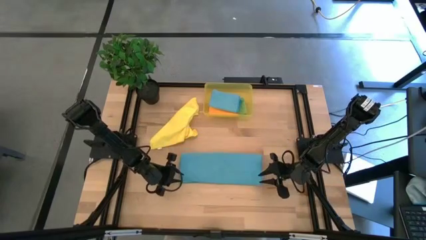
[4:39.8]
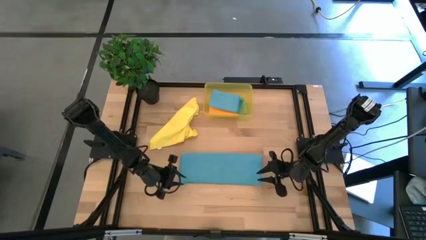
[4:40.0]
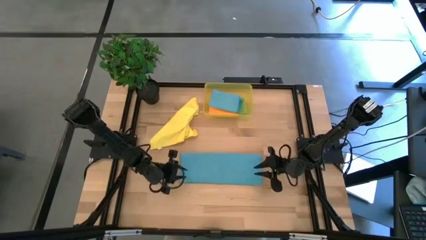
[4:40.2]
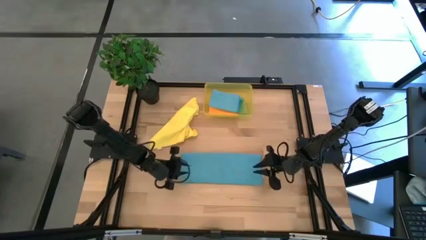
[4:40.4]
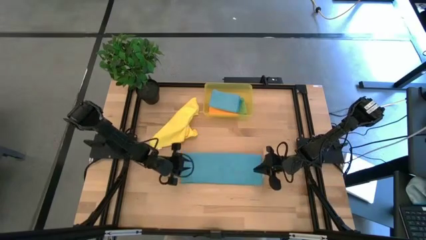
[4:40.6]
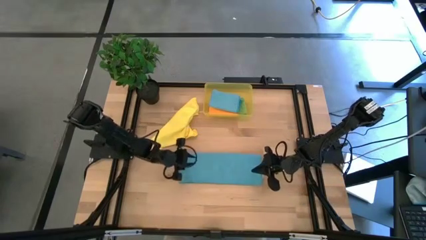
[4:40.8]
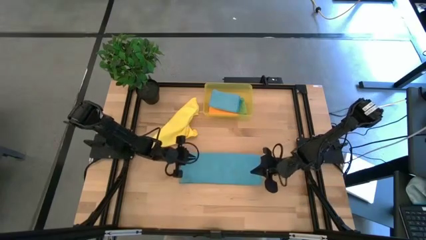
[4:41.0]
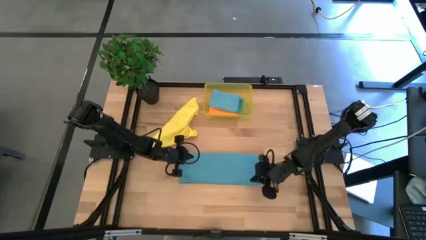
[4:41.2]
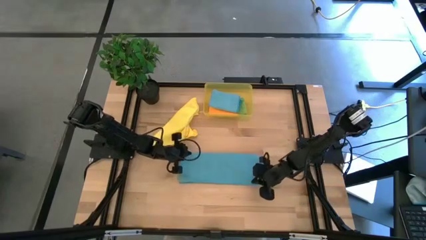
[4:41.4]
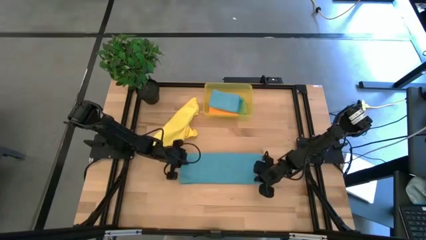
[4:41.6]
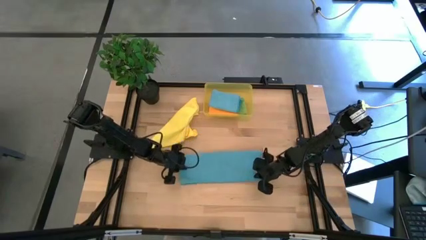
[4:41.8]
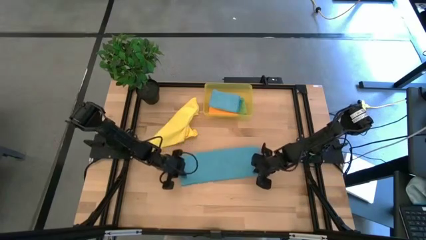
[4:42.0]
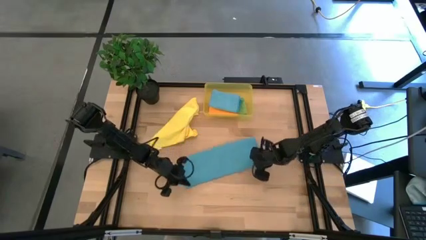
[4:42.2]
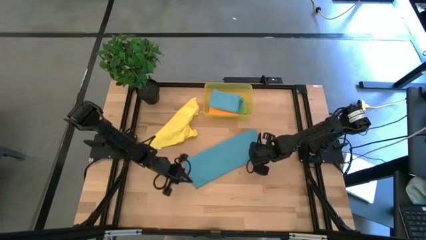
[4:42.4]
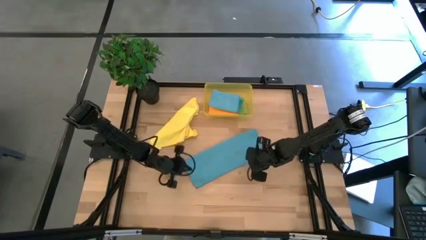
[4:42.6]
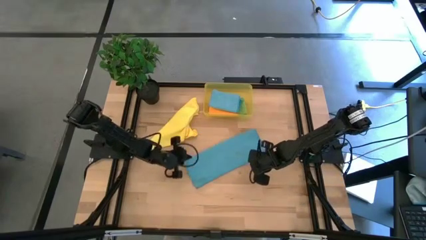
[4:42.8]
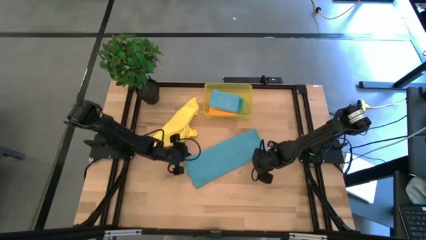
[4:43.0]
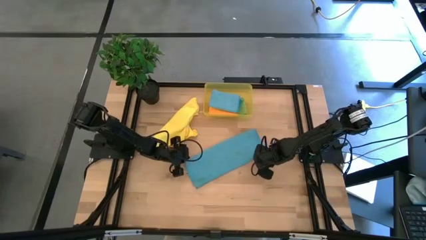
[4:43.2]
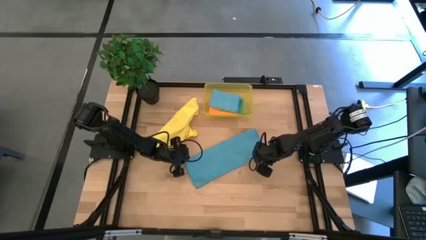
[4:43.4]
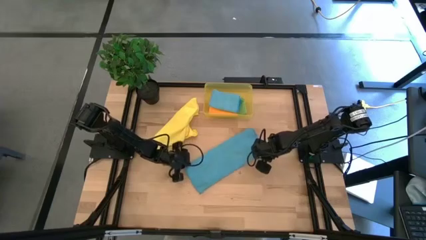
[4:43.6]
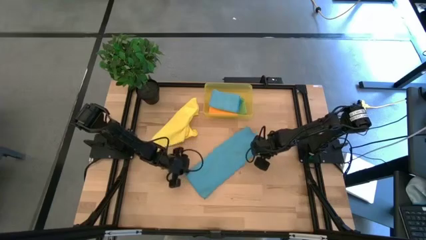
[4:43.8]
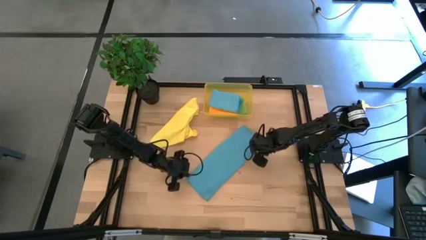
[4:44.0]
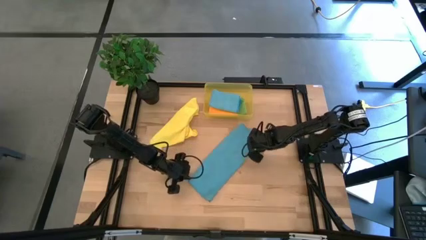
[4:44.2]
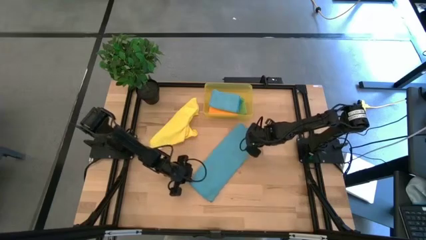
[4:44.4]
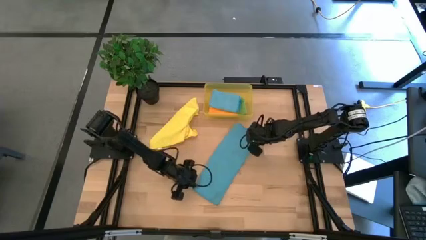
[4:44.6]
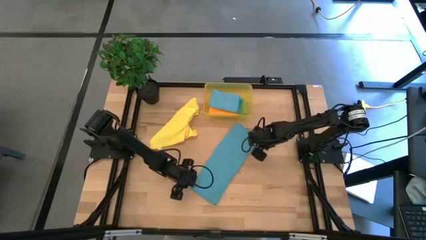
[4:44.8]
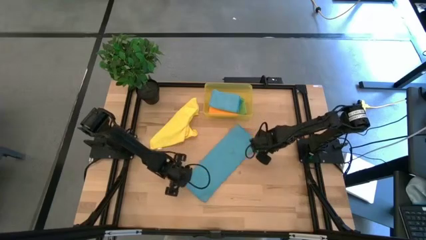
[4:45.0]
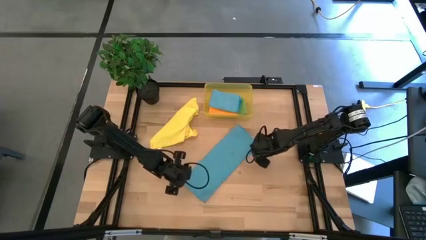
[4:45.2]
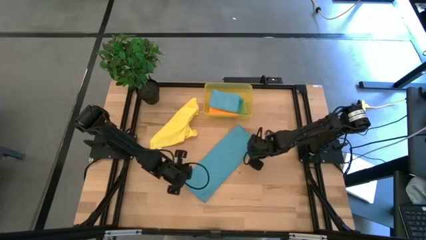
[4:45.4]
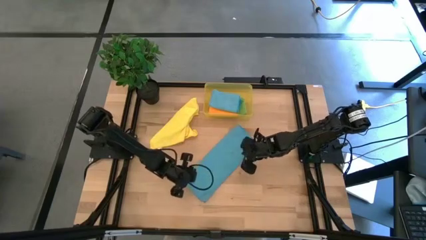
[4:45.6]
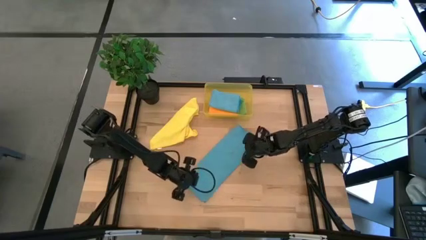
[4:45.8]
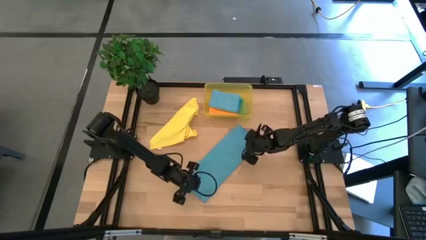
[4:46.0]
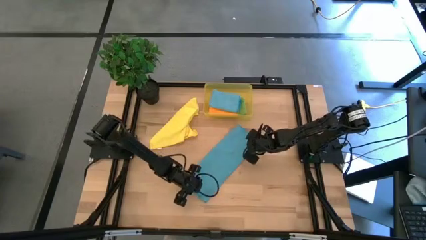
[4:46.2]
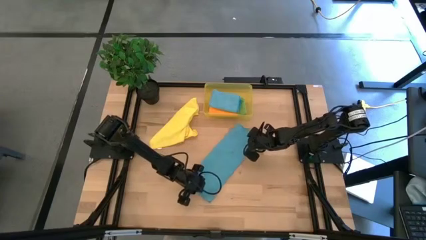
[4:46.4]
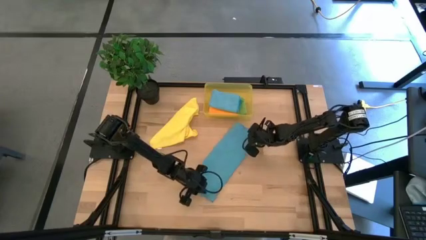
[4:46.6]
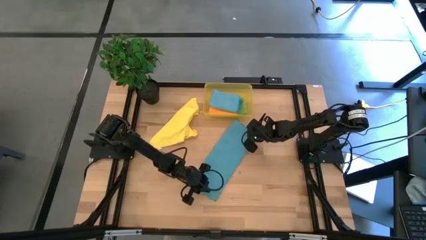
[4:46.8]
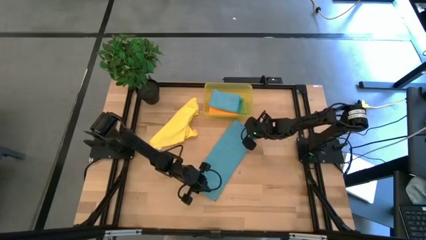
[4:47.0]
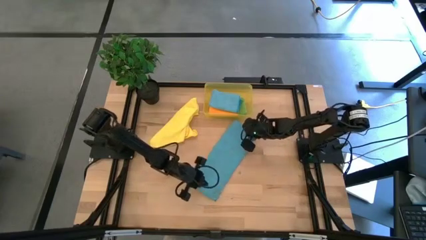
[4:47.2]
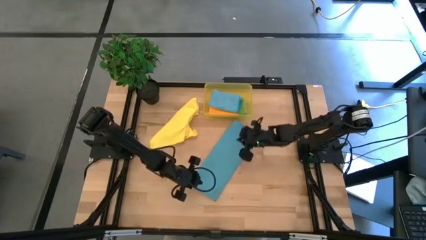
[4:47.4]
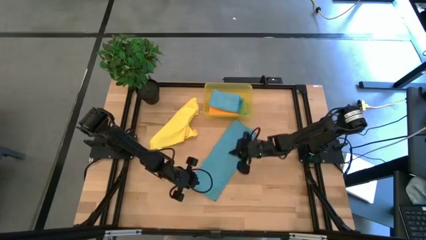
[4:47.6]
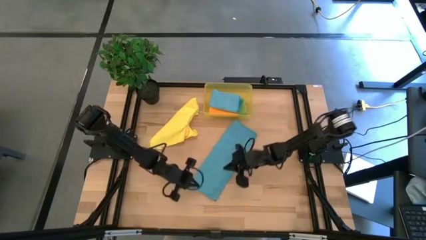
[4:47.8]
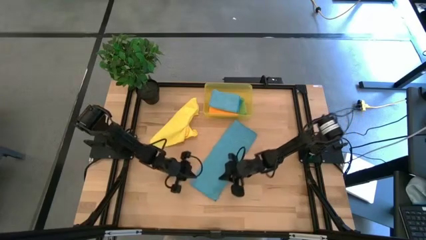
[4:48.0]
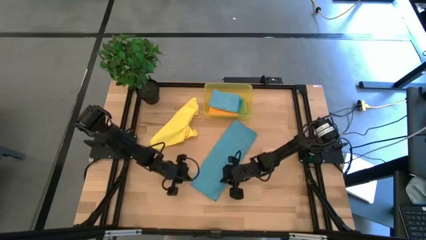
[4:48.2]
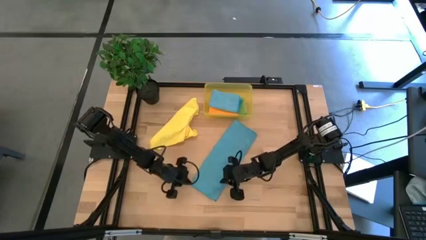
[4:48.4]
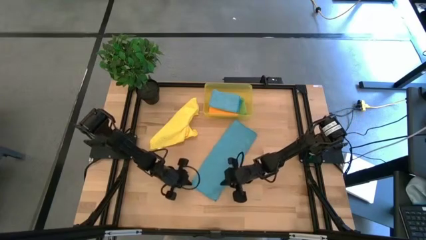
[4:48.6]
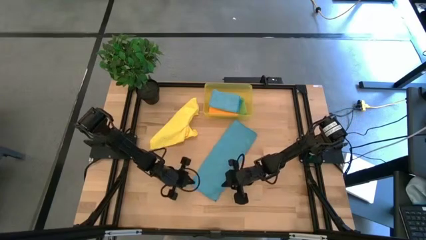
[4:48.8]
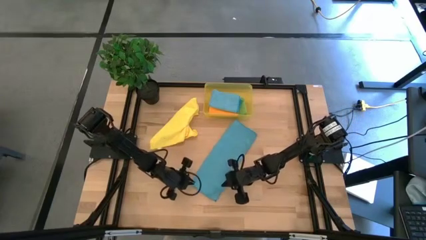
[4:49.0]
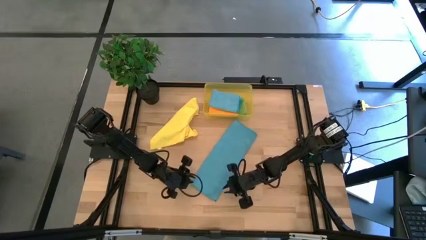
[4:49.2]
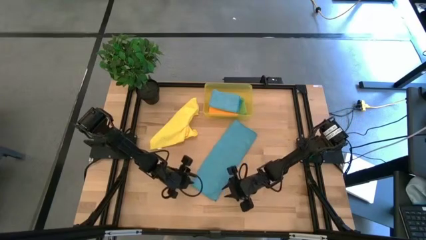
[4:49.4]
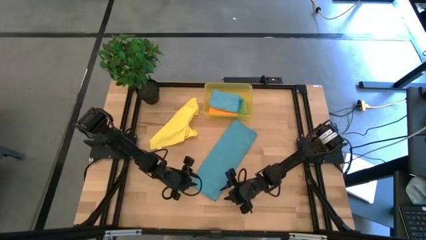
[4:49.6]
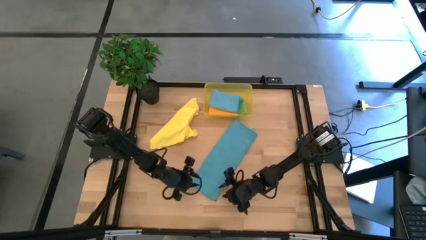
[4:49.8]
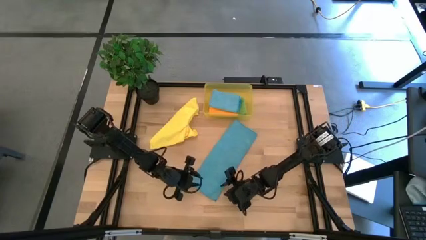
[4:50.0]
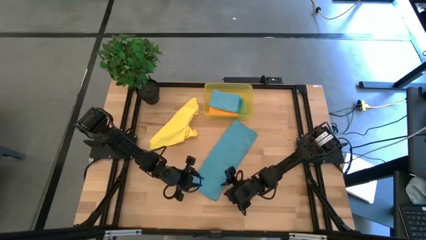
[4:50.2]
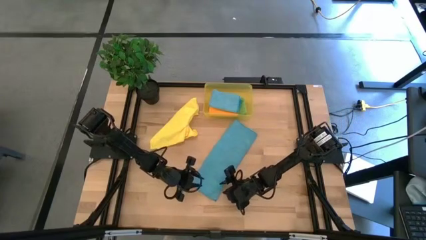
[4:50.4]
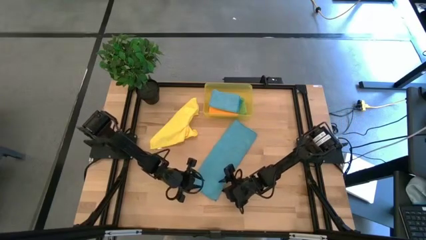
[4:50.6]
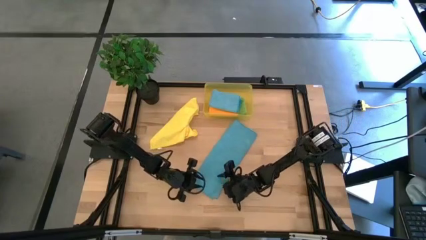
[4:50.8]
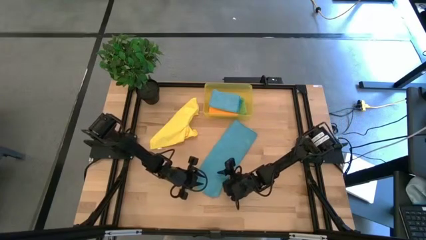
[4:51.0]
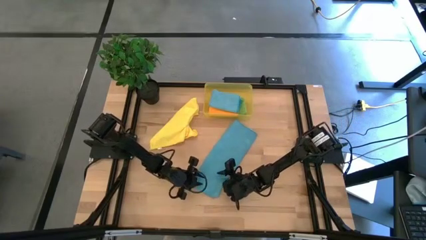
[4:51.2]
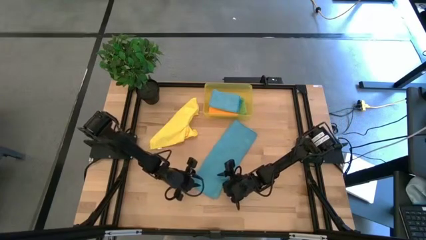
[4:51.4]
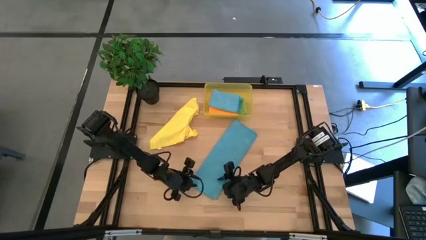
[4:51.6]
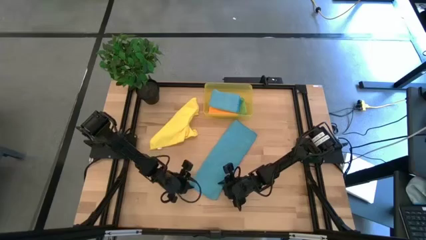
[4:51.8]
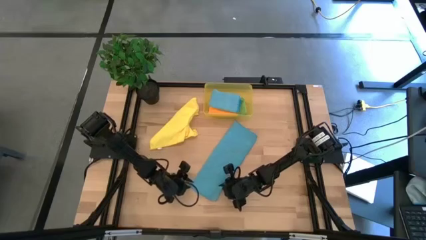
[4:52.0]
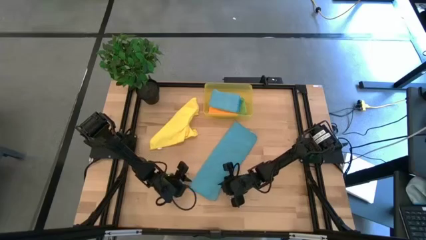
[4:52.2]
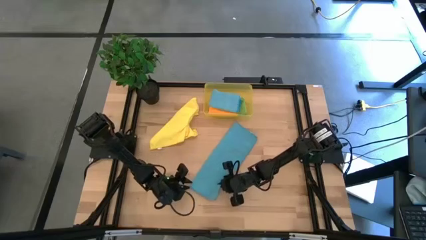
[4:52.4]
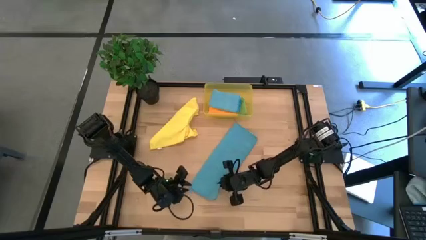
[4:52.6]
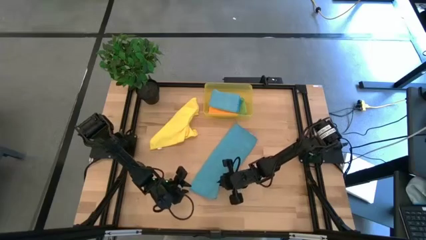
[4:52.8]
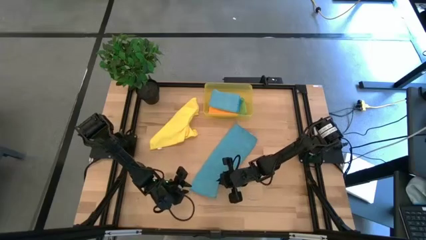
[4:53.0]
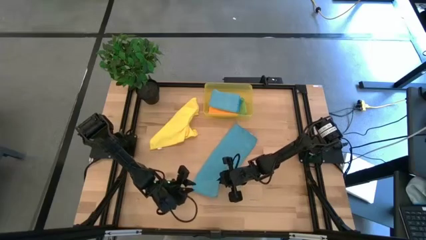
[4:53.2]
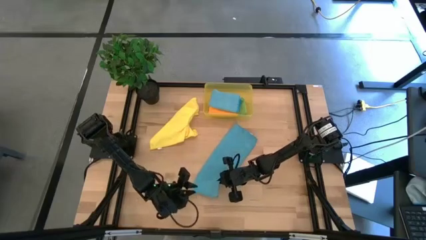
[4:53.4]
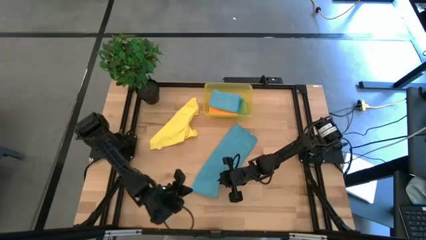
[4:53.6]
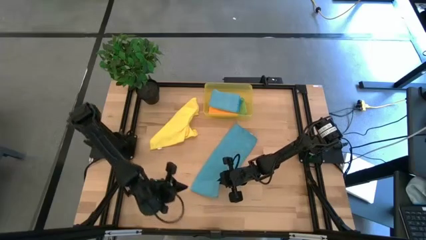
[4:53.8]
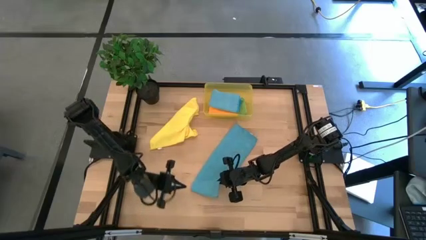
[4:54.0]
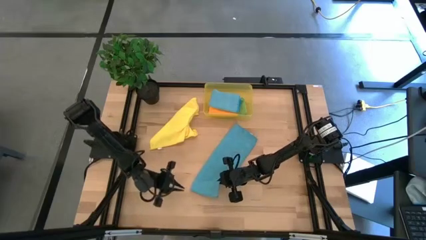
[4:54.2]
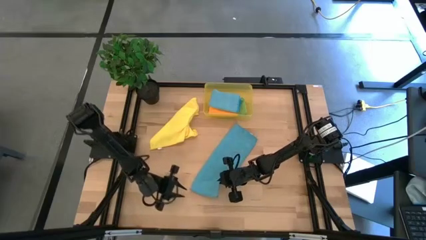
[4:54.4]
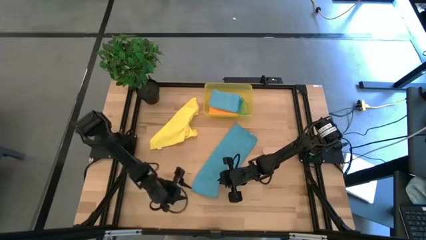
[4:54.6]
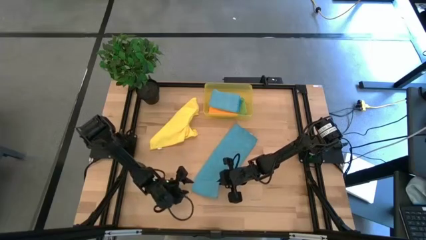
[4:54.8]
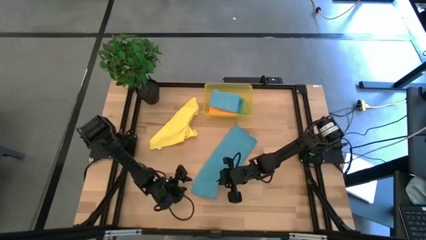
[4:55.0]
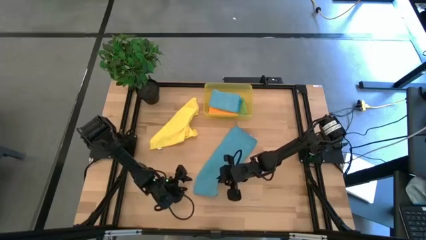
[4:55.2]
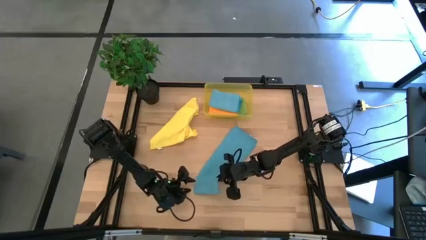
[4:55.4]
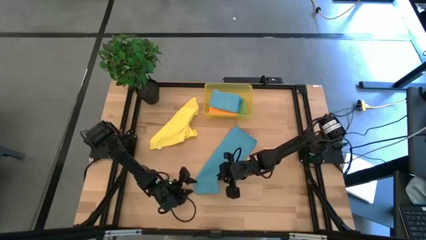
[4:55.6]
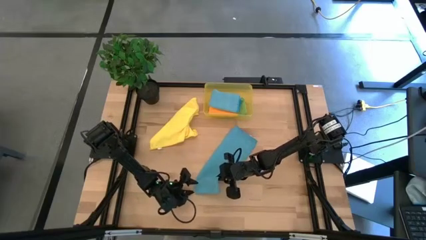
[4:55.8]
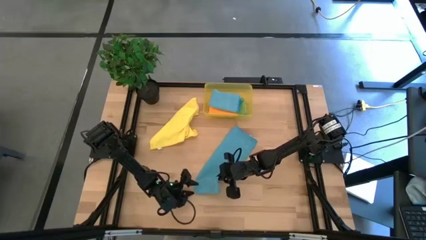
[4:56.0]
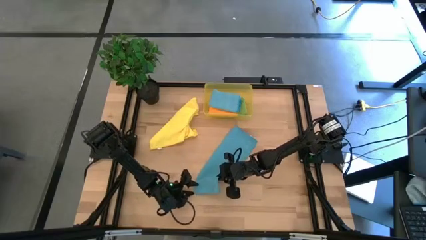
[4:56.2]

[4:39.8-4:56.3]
Task: Fold microfiber towels
Fold the blue microfiber cloth
